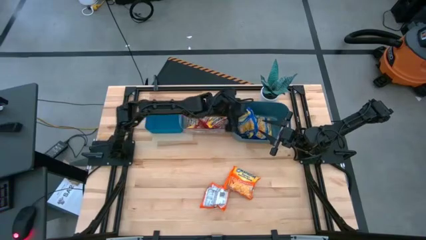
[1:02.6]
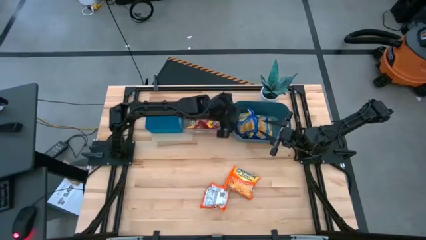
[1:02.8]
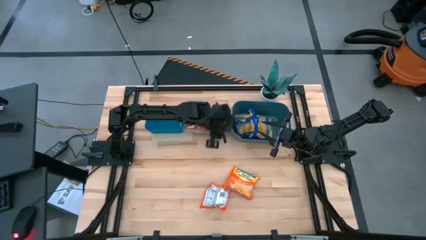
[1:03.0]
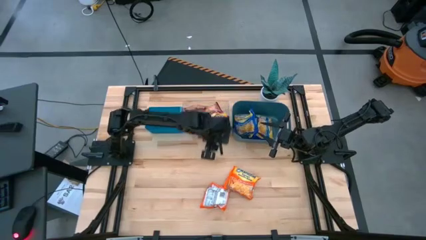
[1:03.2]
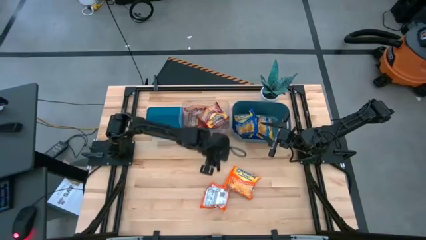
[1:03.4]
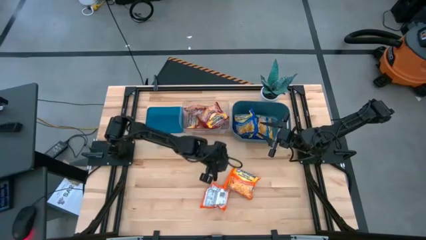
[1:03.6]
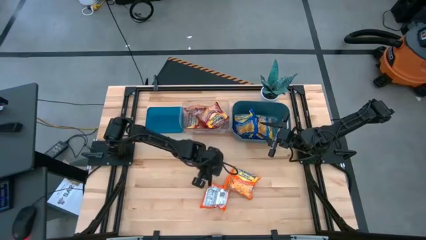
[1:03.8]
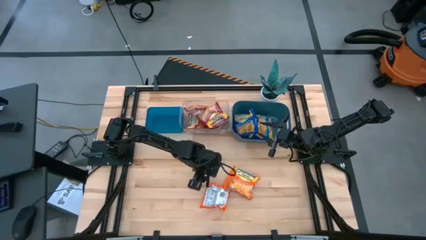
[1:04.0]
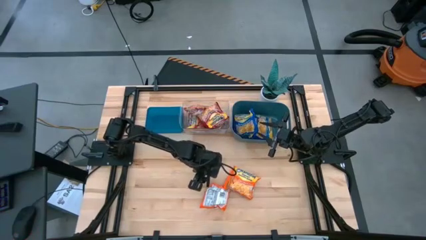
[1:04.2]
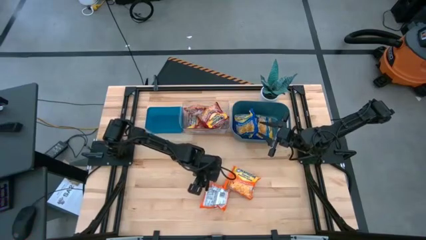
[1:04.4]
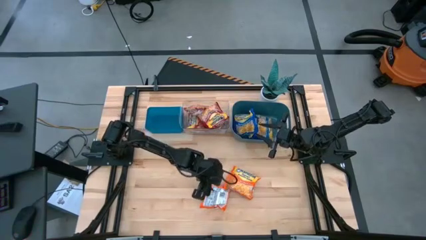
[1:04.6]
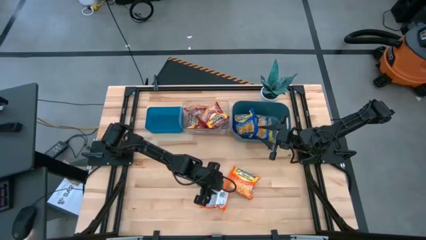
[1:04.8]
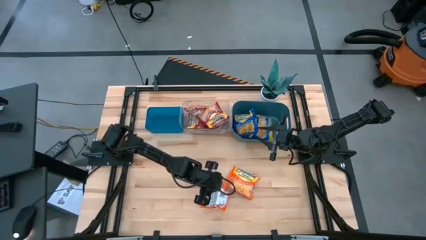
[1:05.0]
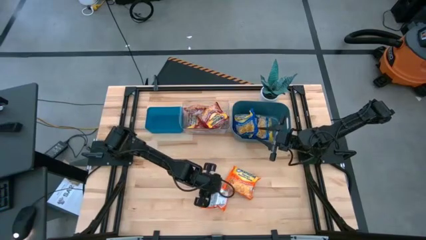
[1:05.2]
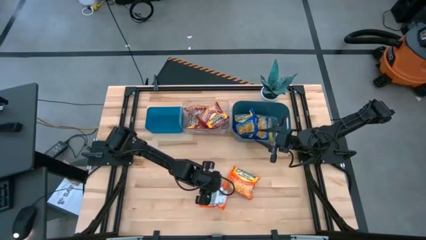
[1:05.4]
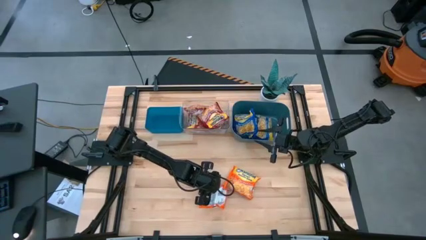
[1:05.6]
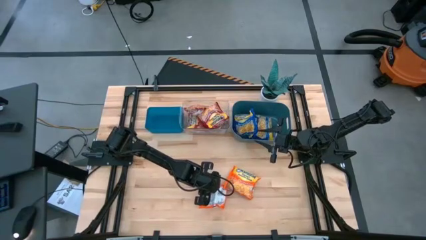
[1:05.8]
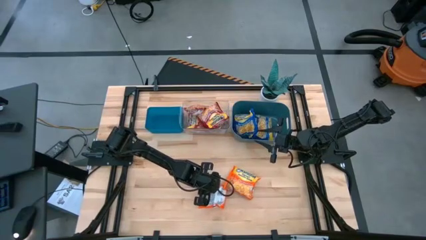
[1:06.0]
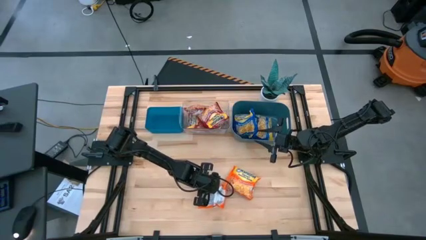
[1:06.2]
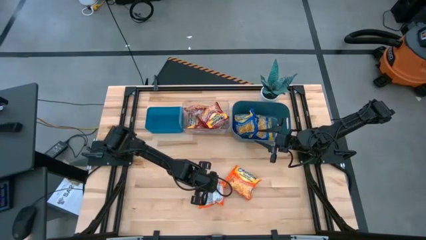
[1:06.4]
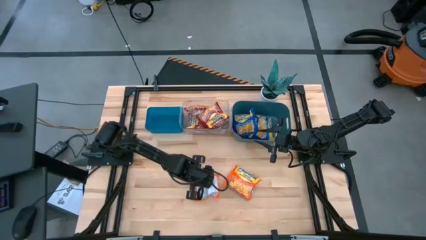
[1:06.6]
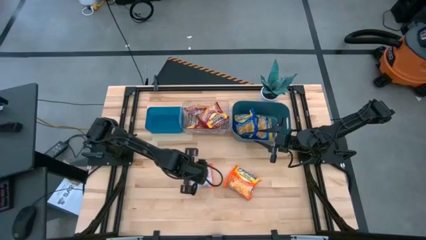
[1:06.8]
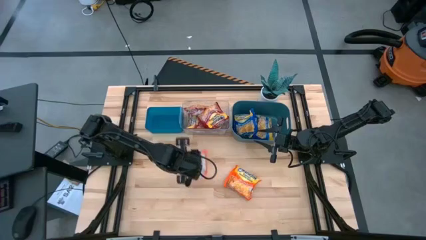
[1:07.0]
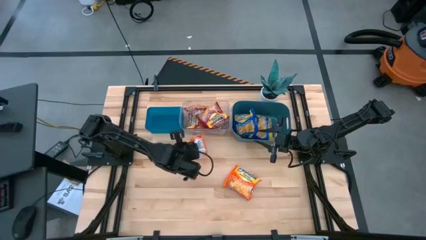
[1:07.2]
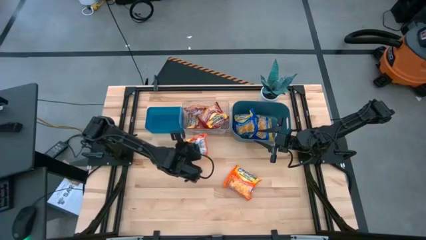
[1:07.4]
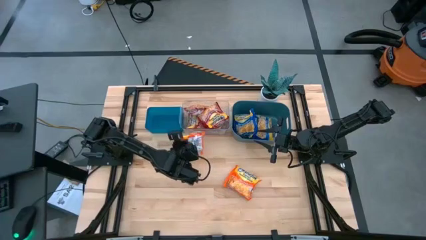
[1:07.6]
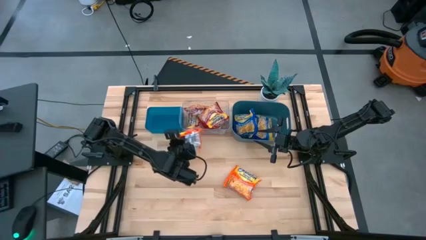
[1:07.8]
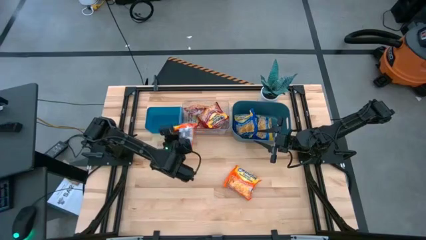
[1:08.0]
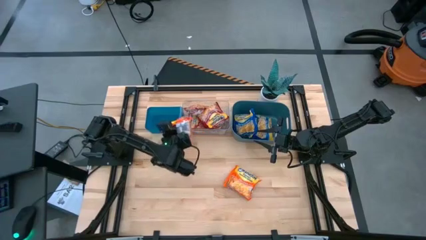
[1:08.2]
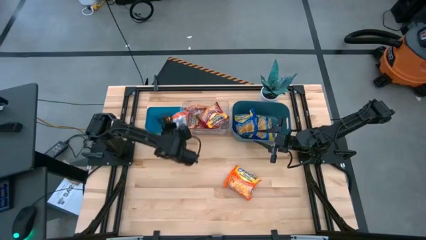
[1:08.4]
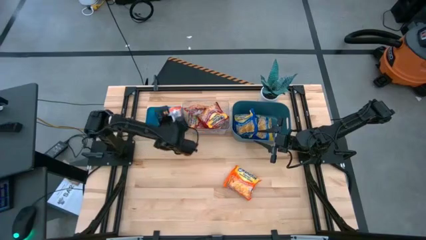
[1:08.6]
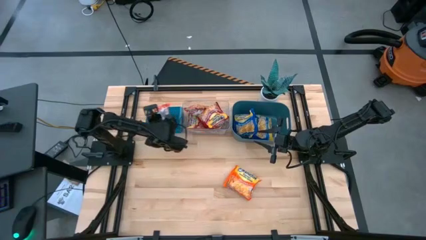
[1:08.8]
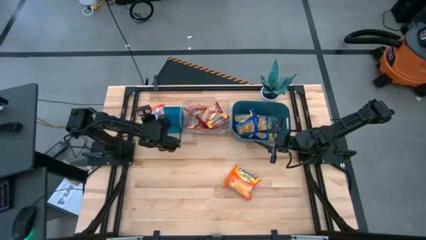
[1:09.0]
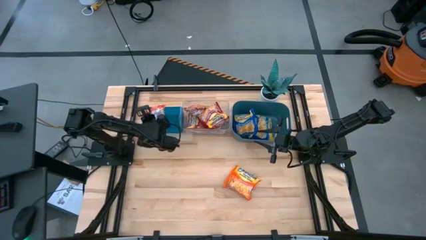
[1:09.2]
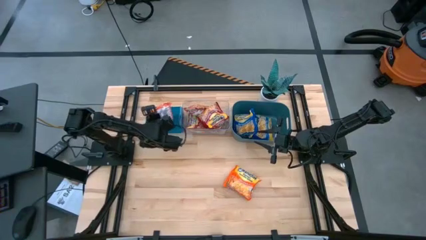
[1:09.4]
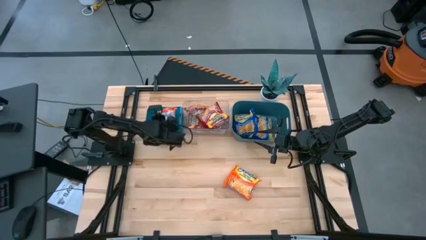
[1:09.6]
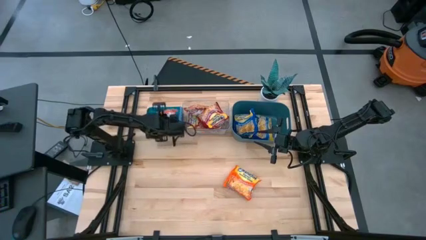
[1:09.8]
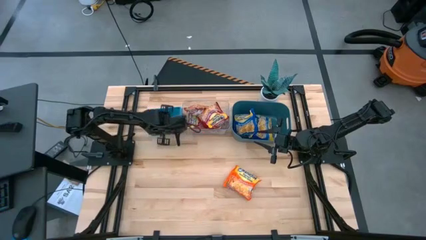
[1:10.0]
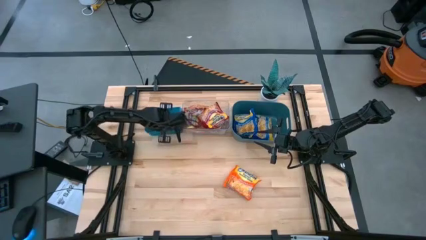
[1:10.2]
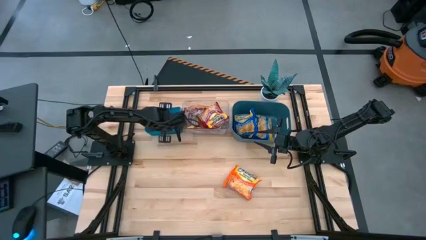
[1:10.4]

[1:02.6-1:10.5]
Task: Sort Maruchan noodles
Put the orange noodle pack into the blue bin

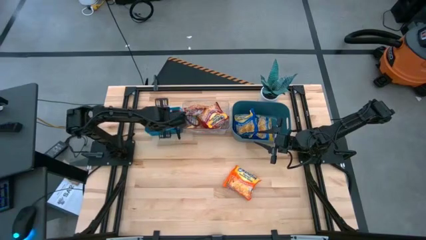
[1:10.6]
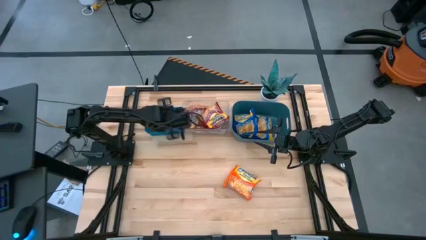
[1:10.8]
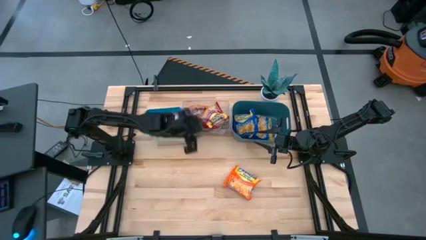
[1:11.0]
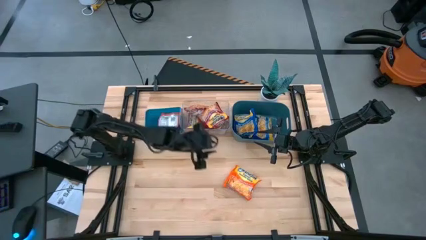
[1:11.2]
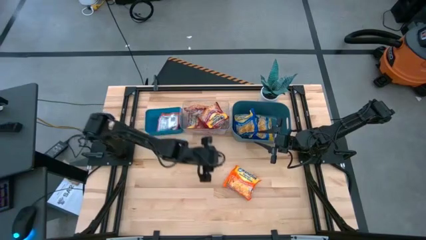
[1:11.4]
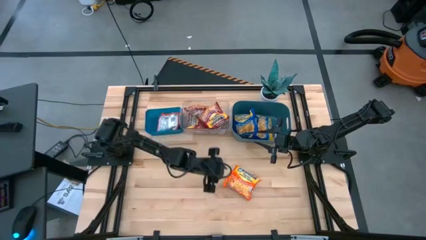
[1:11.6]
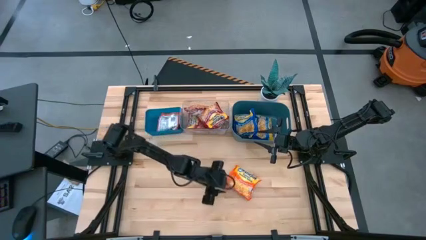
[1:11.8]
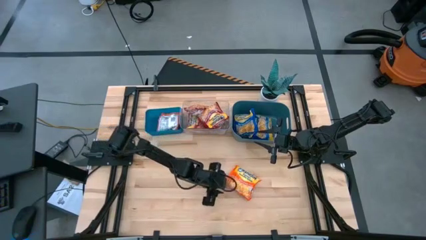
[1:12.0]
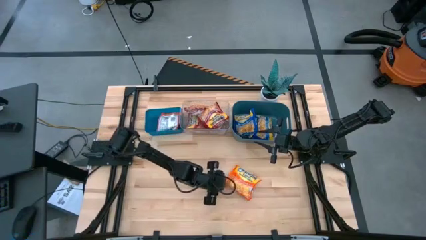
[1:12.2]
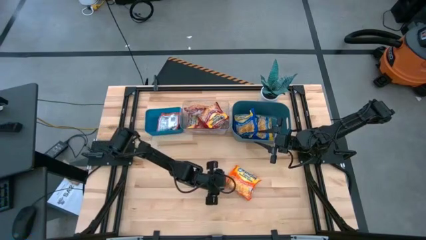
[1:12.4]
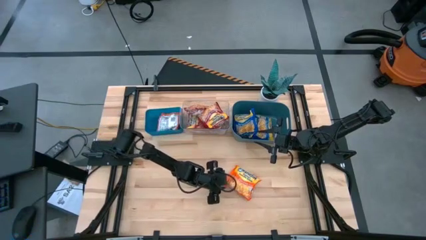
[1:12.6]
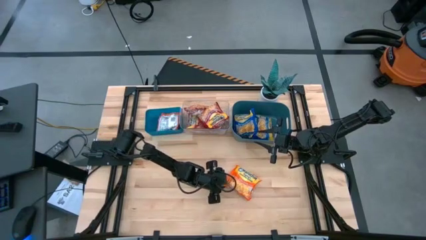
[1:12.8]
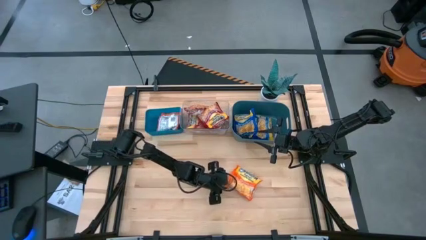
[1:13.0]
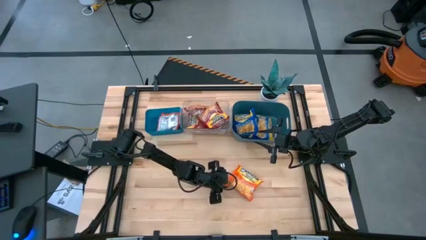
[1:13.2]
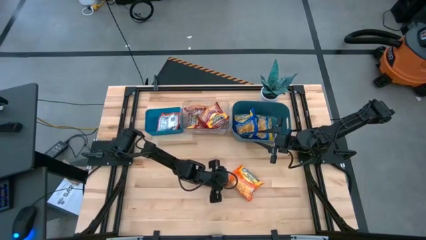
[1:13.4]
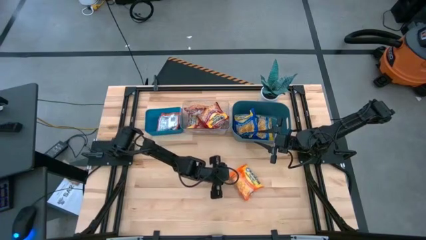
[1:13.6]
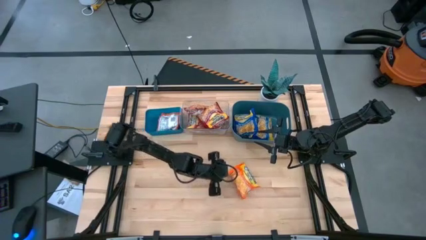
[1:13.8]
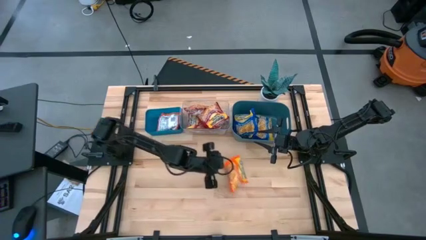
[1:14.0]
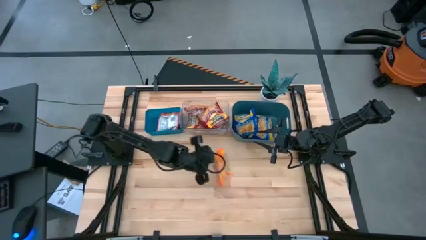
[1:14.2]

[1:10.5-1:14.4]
Put the orange noodle pack into the blue bin

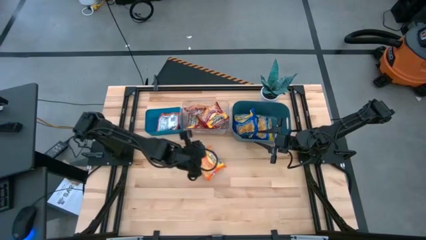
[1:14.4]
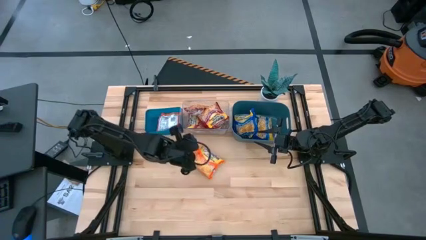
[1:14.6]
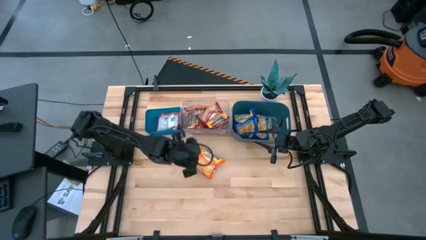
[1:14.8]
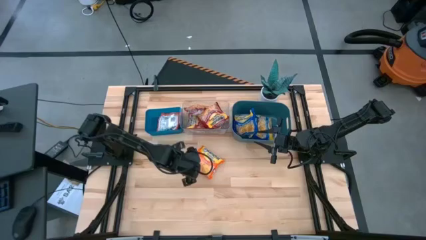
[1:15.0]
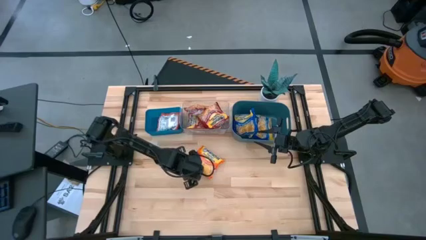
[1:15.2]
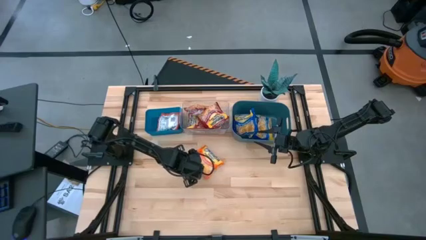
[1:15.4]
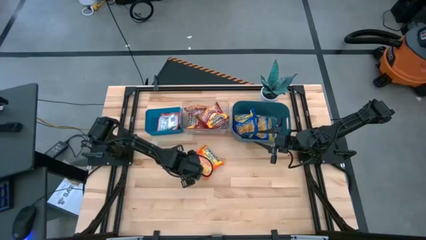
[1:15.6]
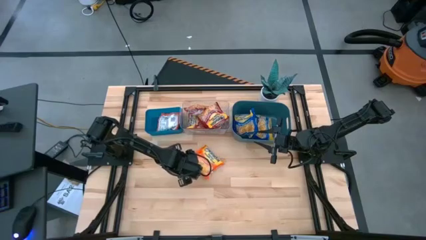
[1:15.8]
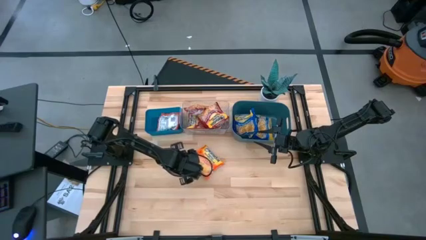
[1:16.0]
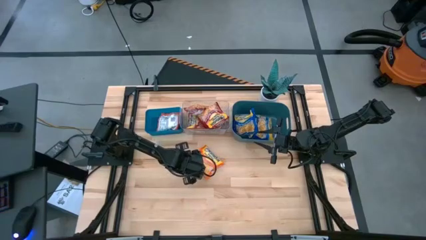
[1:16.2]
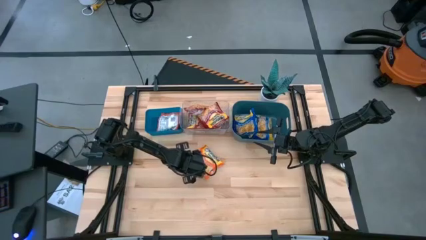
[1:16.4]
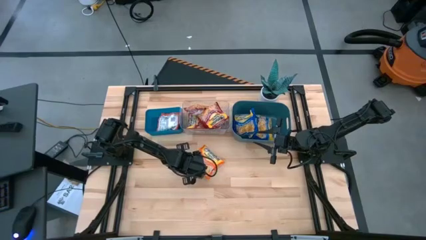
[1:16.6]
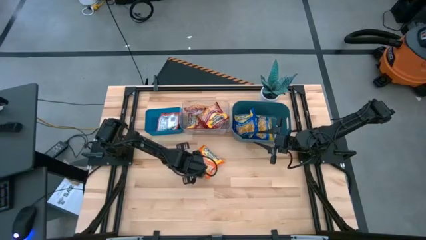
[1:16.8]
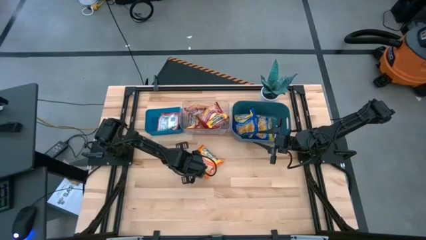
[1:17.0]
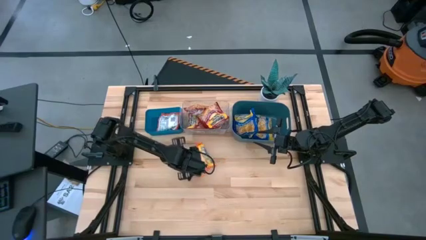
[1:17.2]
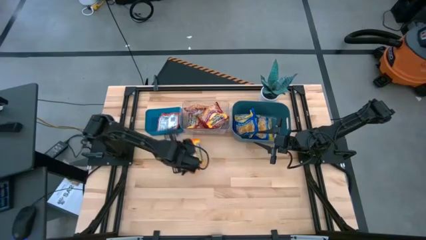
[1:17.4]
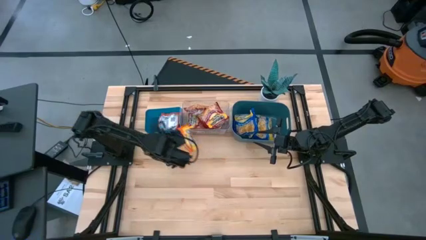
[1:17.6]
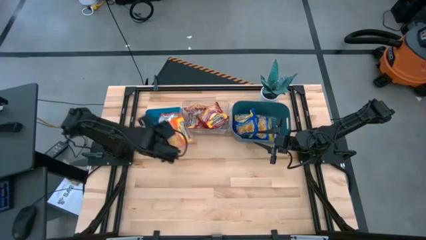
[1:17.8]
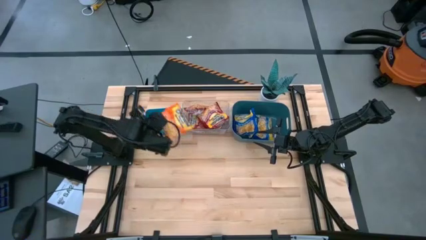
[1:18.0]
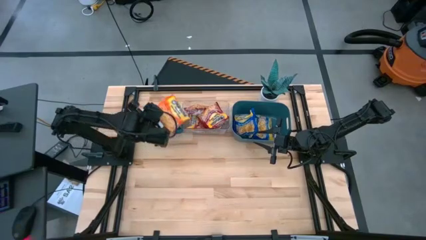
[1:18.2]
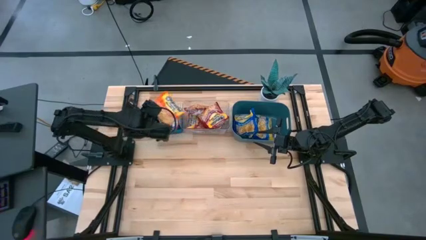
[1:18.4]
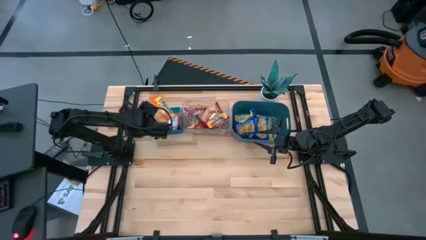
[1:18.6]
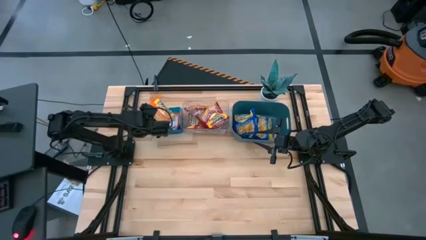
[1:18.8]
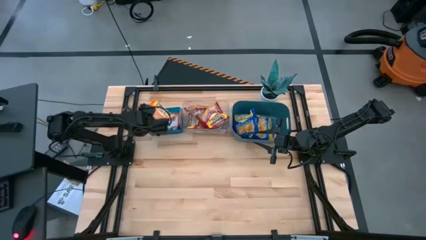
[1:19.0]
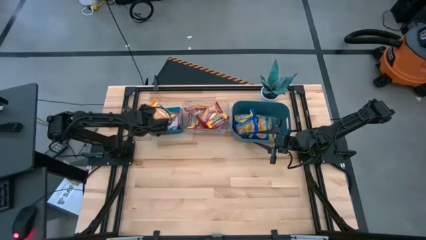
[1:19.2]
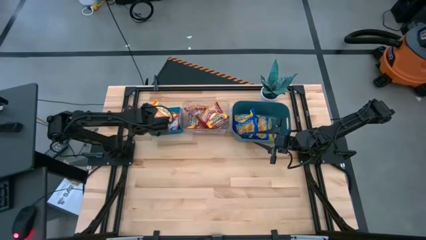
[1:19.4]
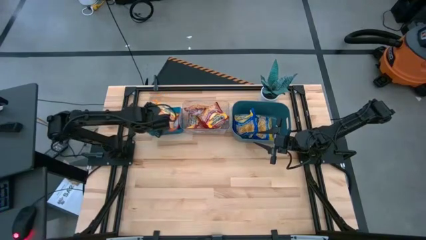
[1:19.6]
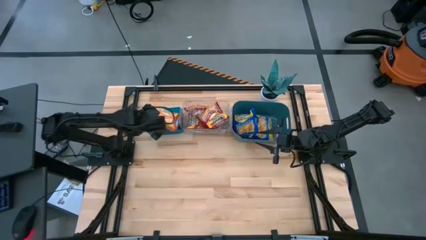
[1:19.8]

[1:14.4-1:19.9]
Put the orange noodle pack into the blue bin

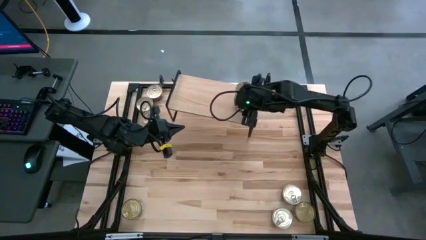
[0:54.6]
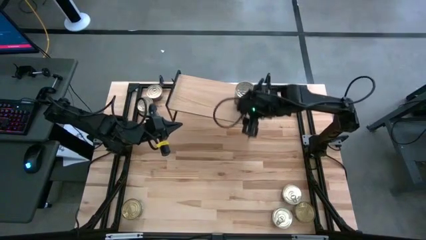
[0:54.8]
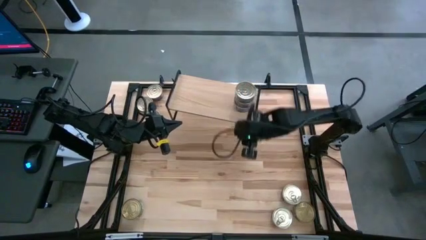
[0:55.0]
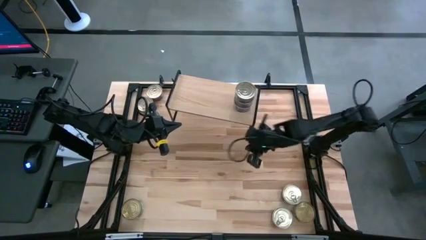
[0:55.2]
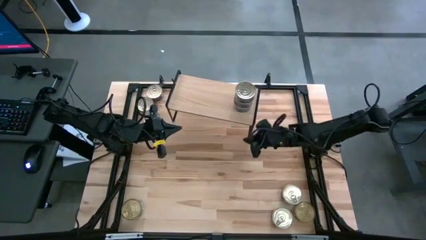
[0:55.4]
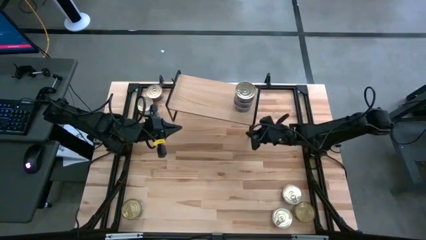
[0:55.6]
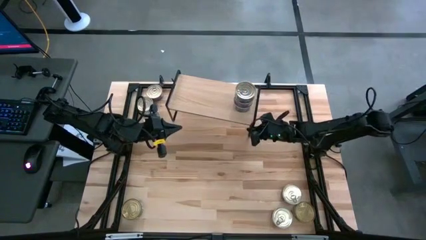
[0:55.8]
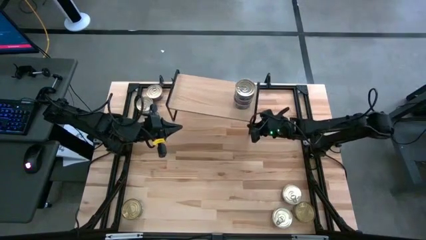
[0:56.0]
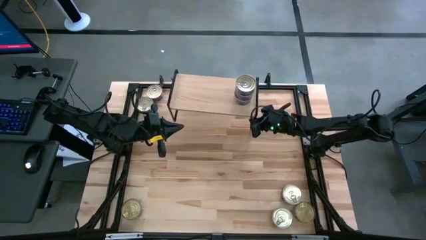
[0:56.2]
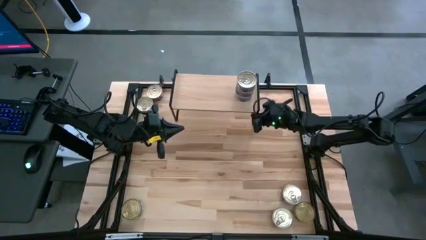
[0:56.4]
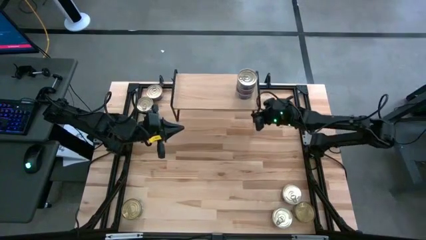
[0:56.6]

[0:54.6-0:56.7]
Task: Stack canned seafood by type on shelf
Adjust the shelf
